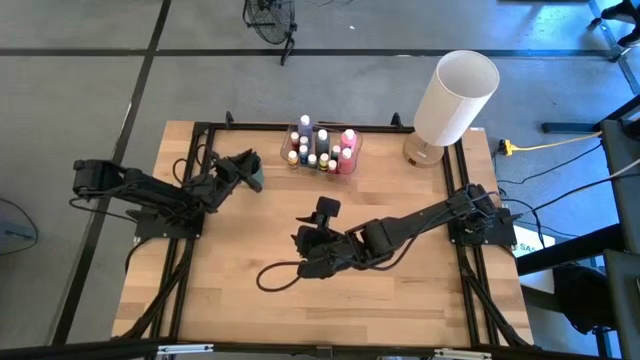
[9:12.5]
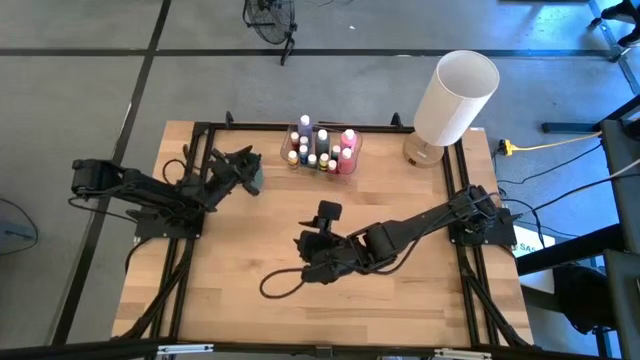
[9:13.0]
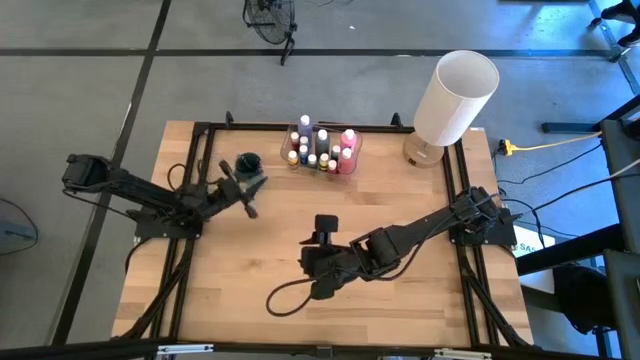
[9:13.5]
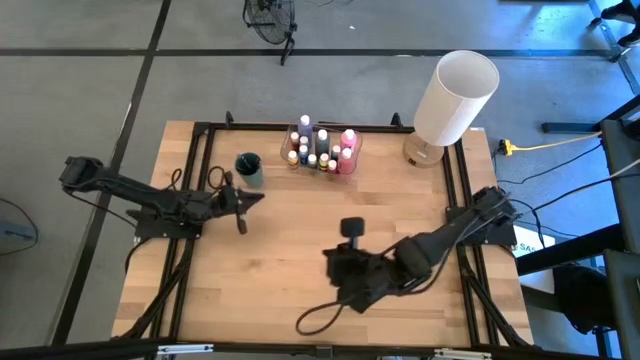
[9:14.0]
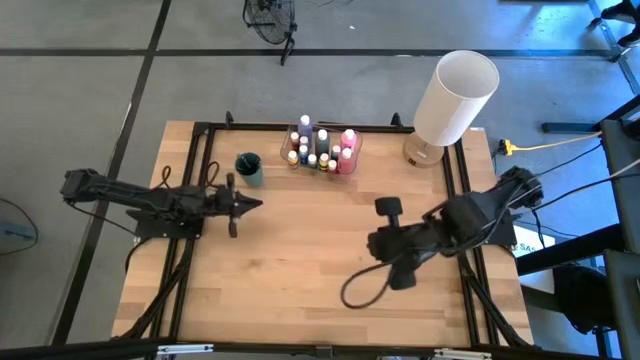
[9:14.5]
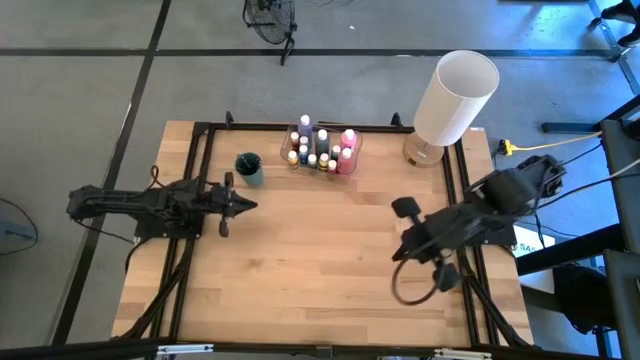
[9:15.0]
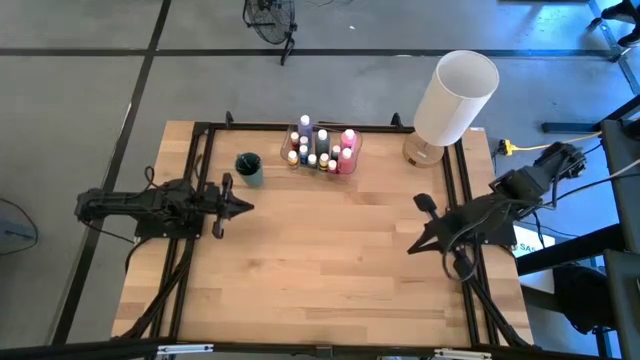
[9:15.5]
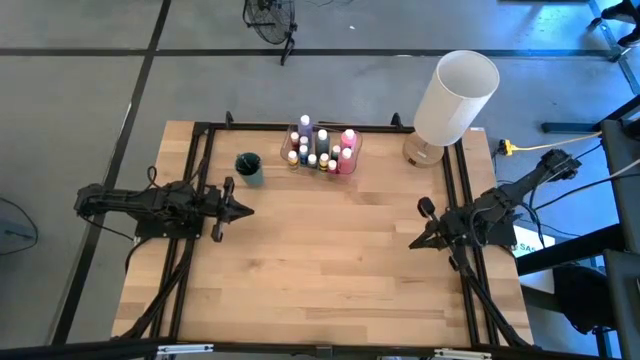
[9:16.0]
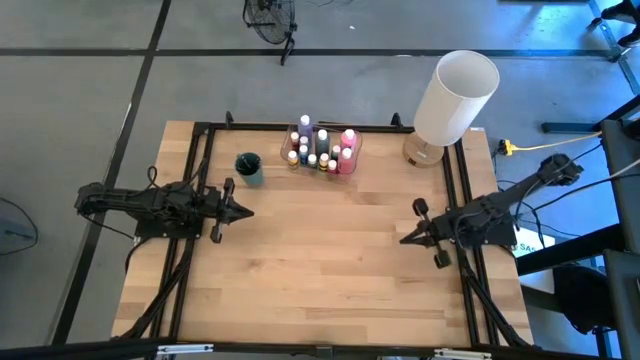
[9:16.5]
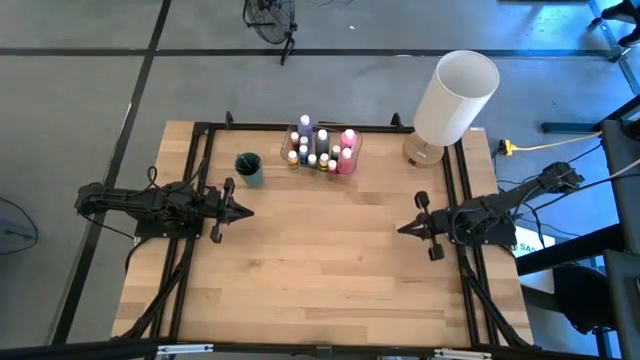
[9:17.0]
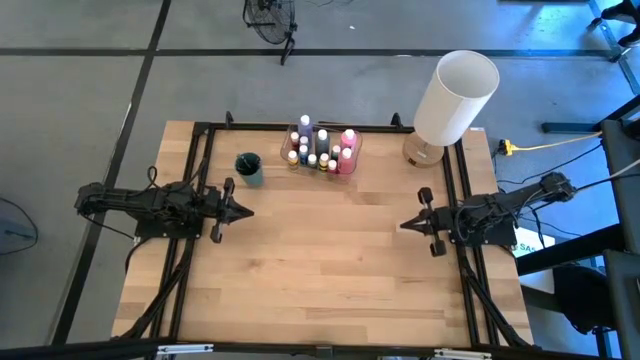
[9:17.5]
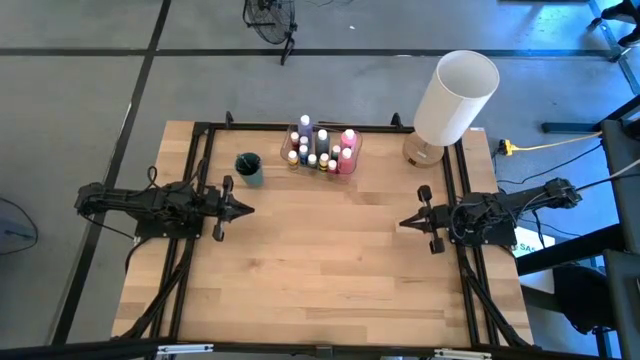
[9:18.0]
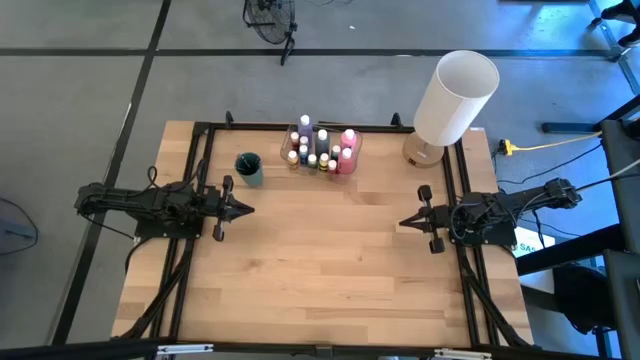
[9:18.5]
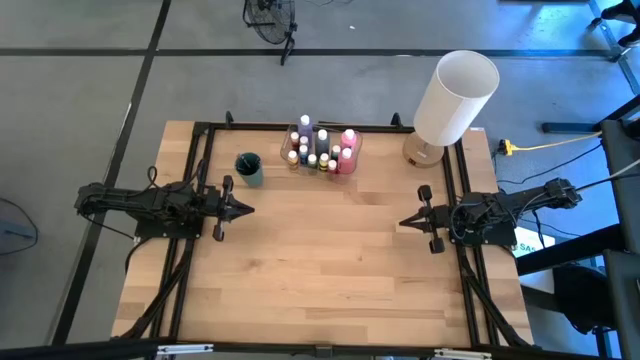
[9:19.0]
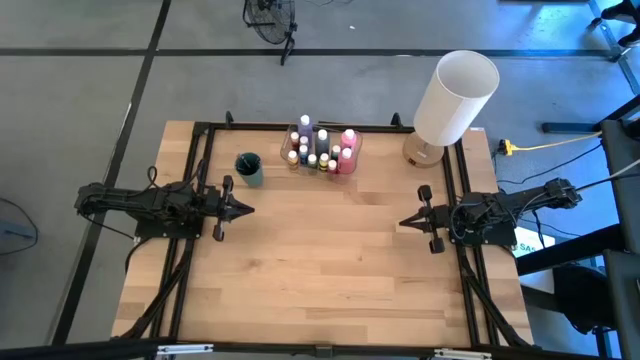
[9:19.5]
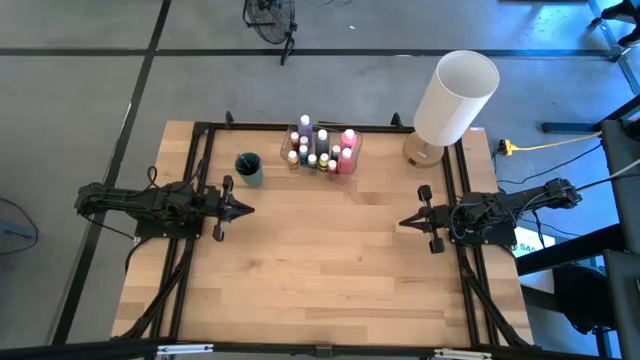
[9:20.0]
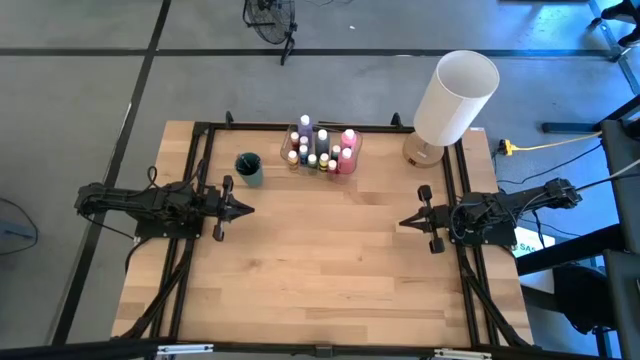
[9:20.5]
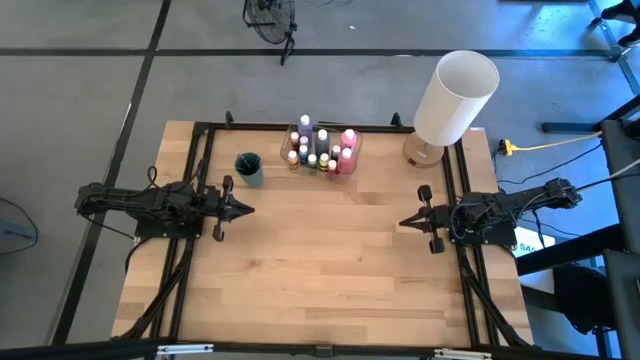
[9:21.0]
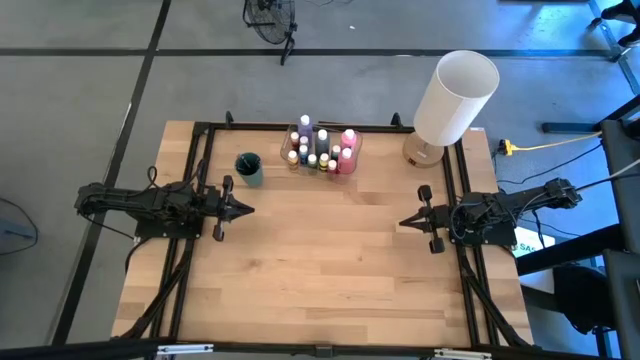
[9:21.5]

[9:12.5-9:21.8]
Task: Pick & Place Paint Supplies
Return to Home Position

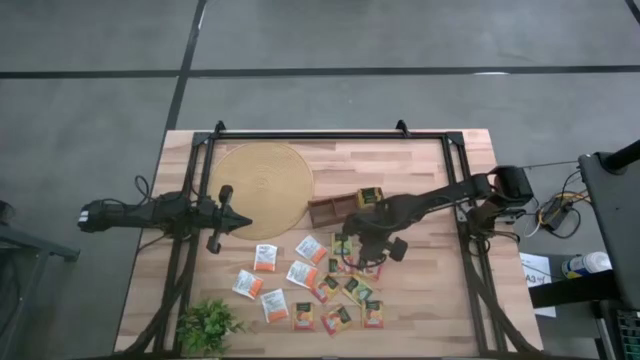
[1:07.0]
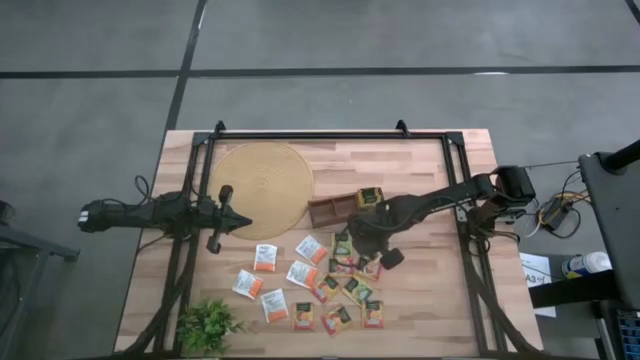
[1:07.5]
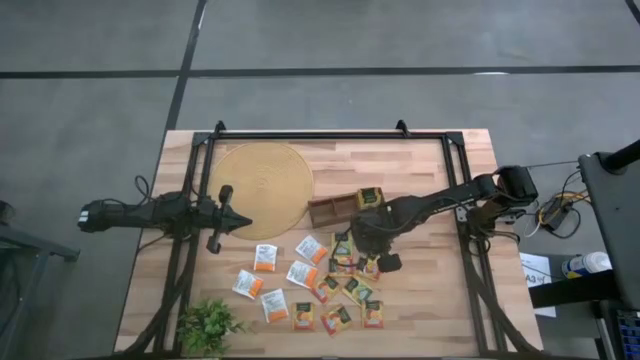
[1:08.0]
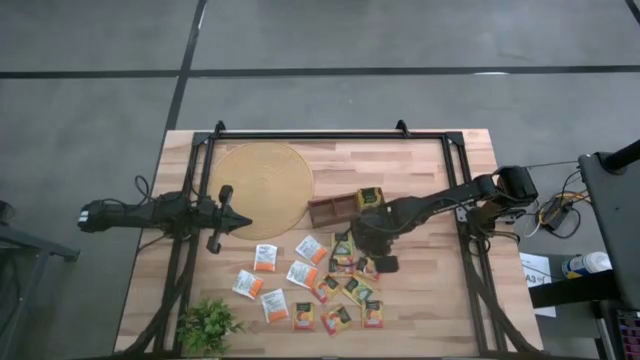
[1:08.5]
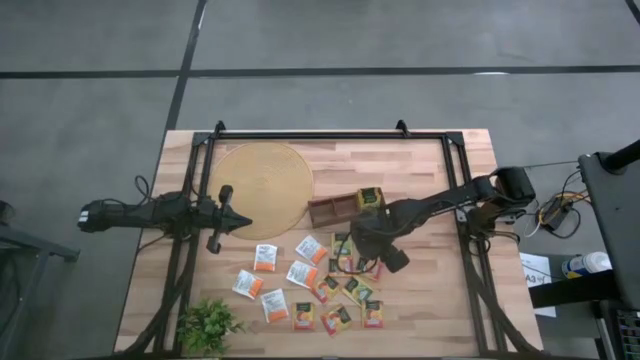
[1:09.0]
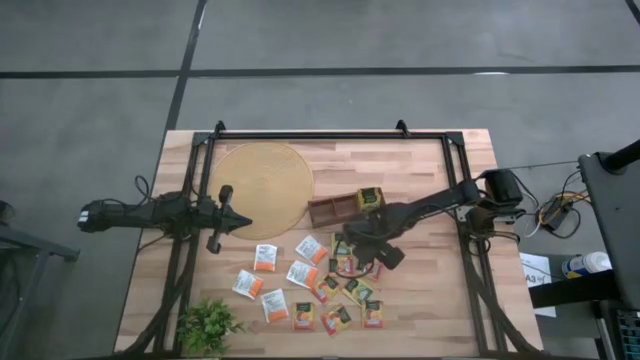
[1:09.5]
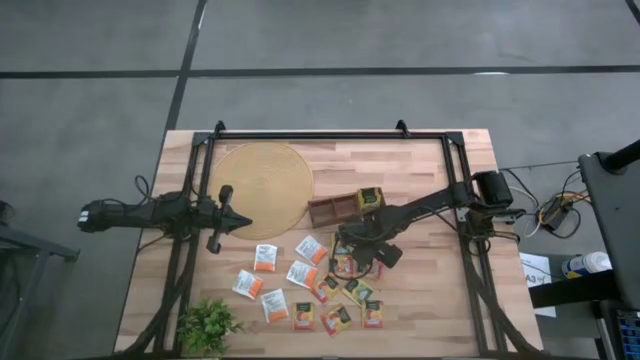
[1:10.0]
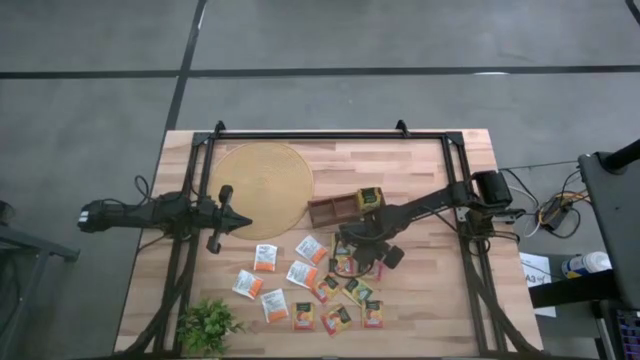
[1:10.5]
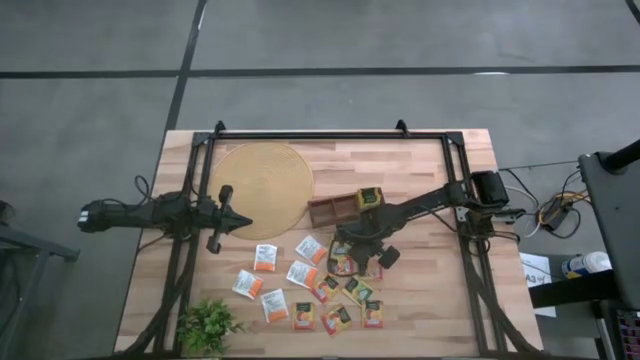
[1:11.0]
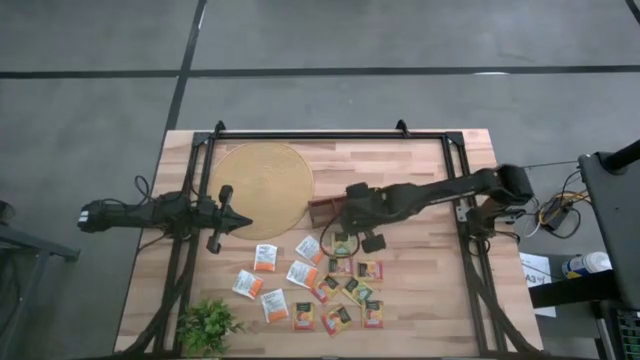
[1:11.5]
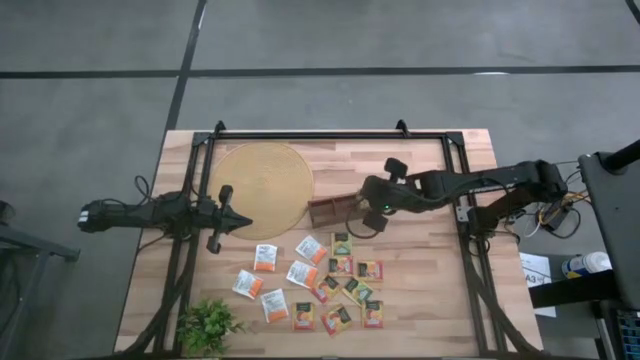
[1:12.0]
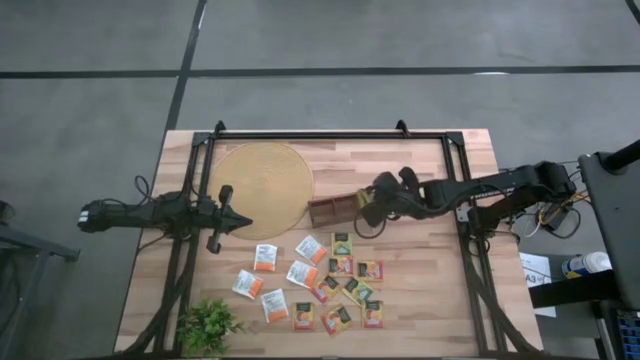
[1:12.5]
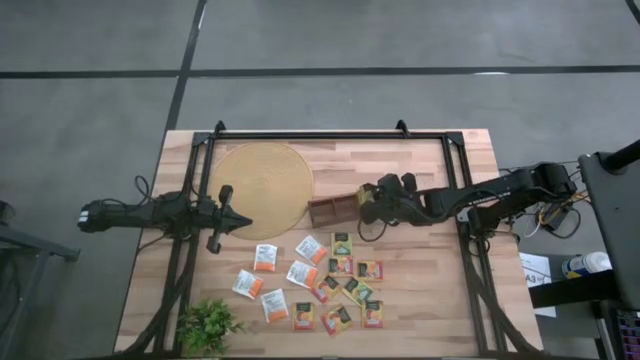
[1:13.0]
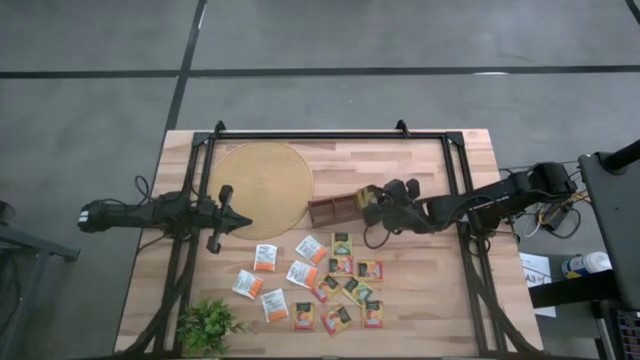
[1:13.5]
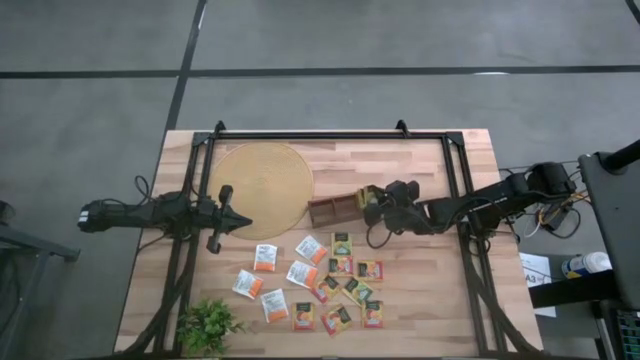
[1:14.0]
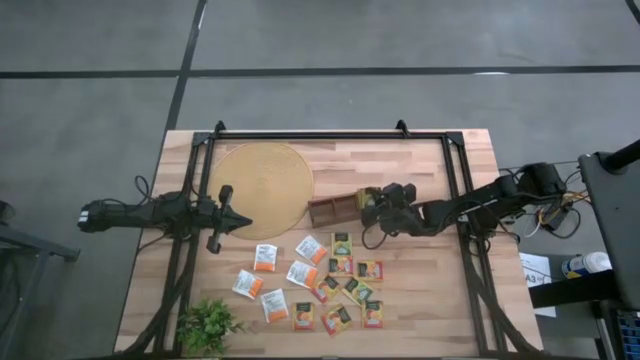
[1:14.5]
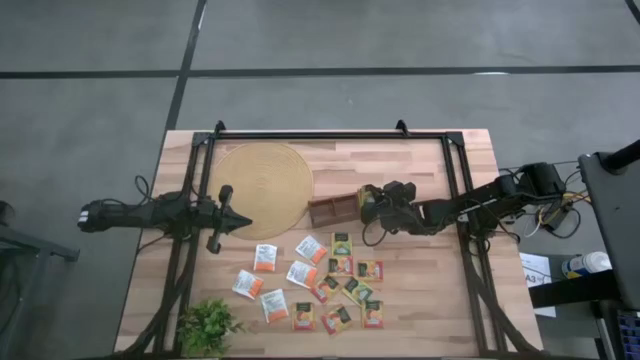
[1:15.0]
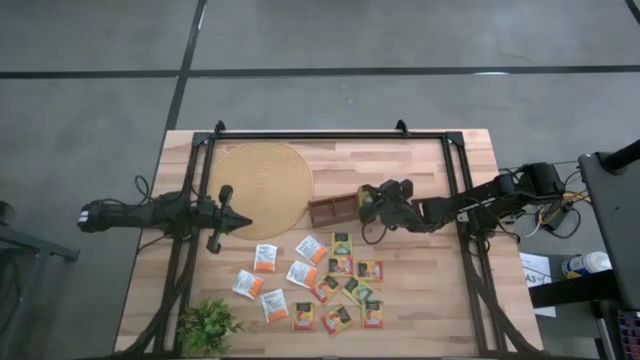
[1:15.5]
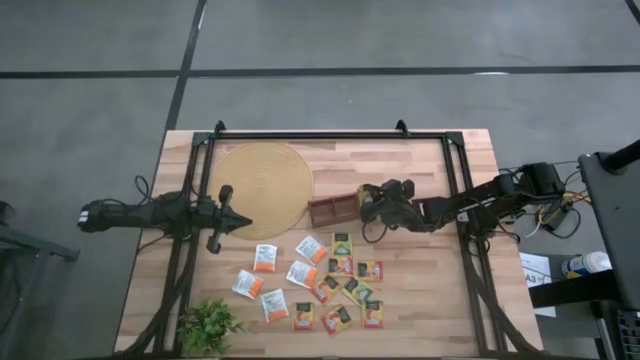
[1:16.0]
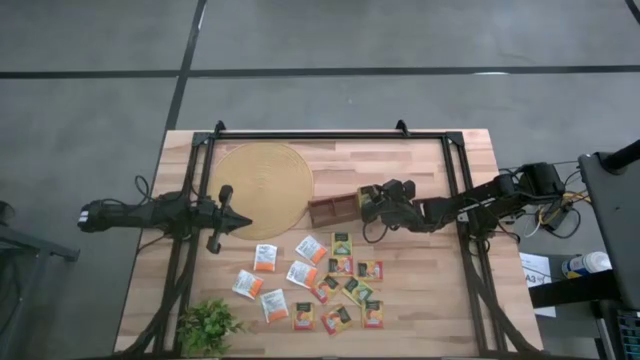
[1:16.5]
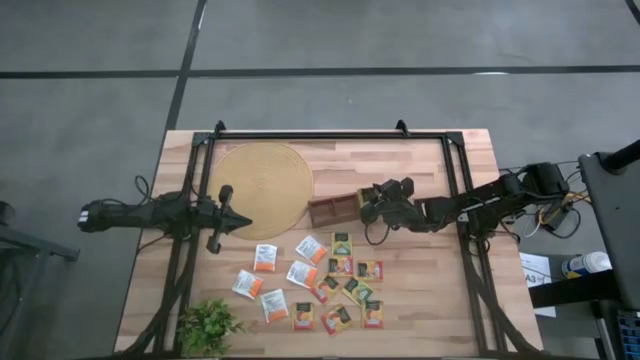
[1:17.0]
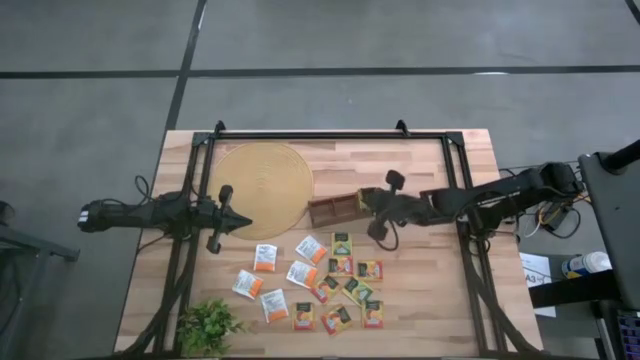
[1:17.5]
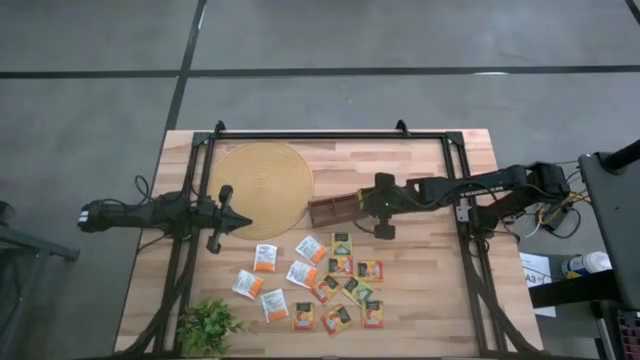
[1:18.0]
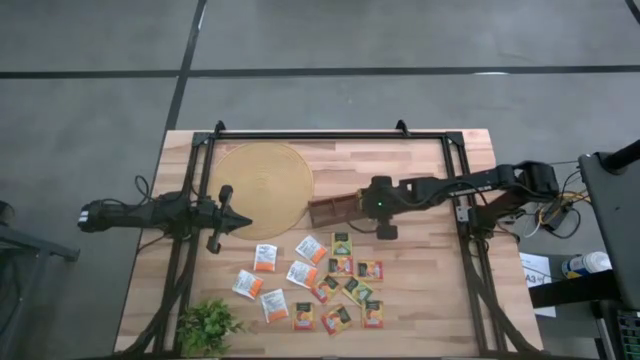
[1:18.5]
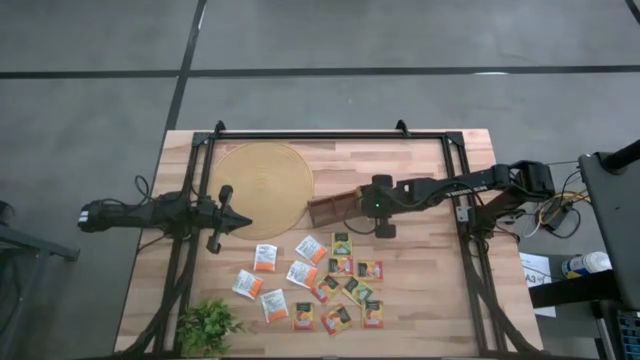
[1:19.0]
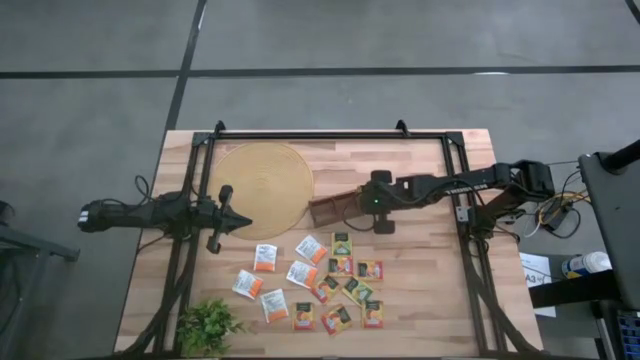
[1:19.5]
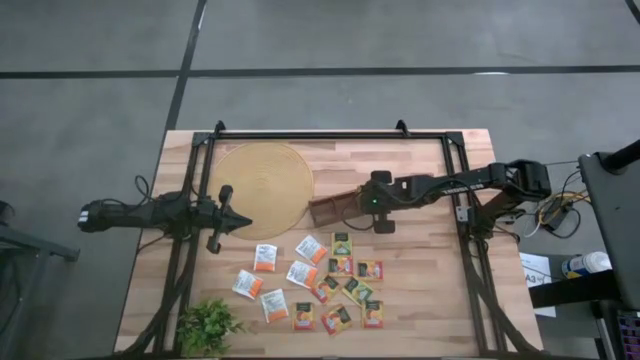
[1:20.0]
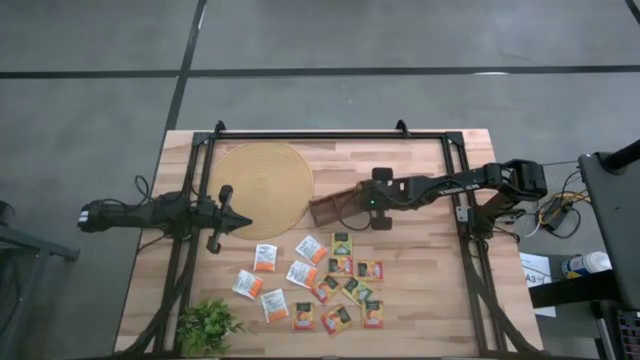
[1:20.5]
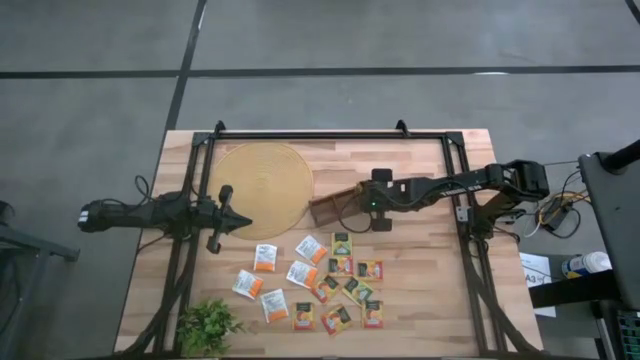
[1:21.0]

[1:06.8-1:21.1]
Task: Pick & Place Tea
Put the yellow tea bag into the right section of the wooden organizer
